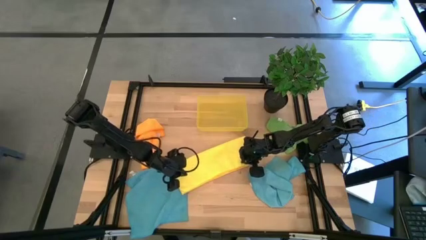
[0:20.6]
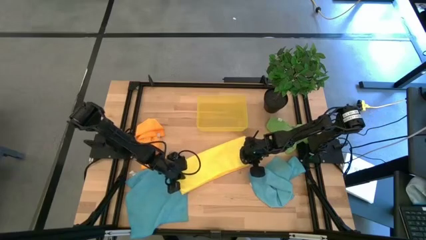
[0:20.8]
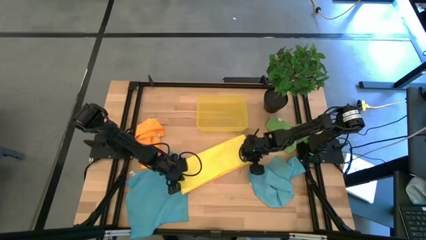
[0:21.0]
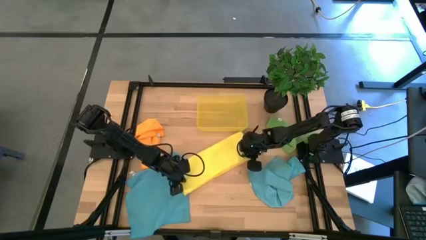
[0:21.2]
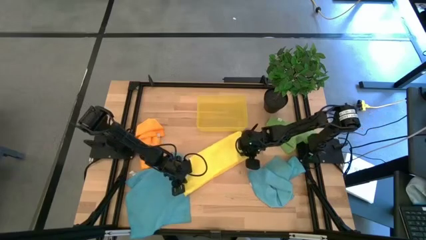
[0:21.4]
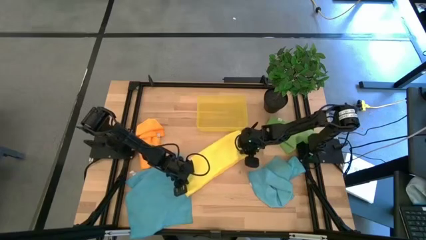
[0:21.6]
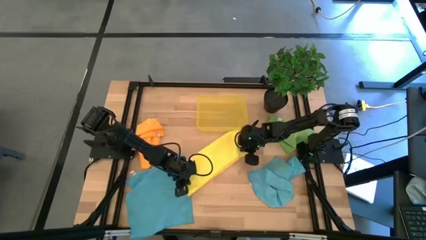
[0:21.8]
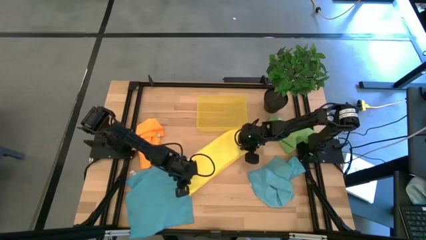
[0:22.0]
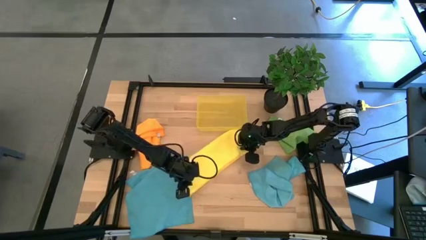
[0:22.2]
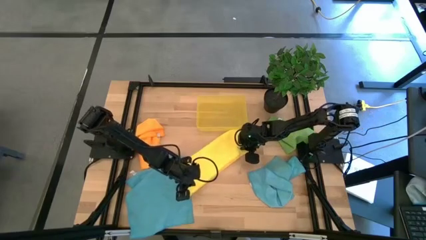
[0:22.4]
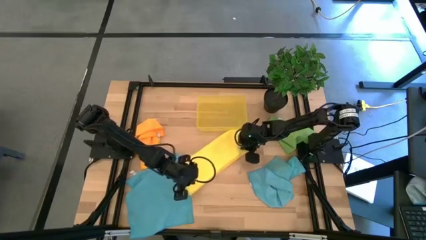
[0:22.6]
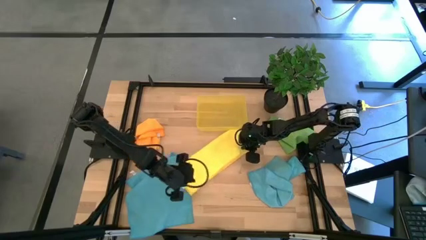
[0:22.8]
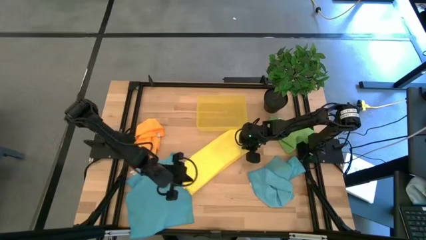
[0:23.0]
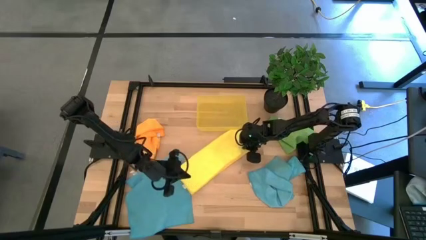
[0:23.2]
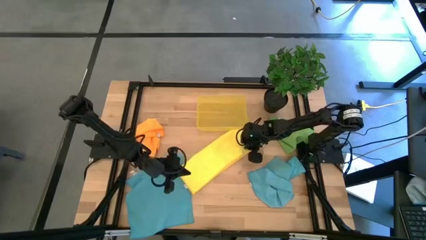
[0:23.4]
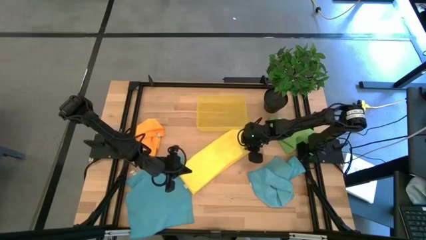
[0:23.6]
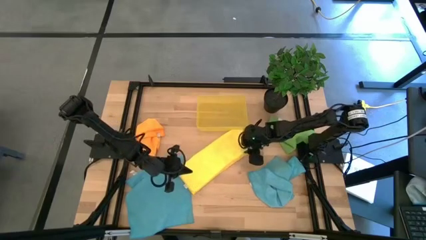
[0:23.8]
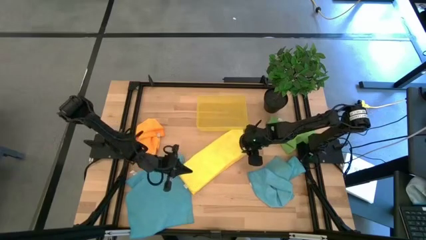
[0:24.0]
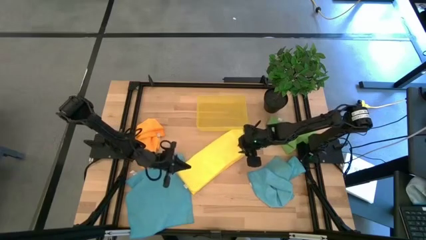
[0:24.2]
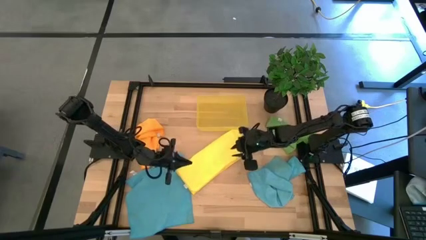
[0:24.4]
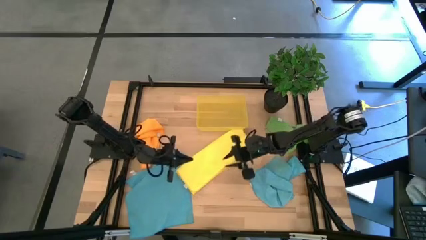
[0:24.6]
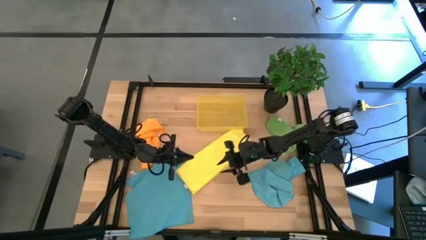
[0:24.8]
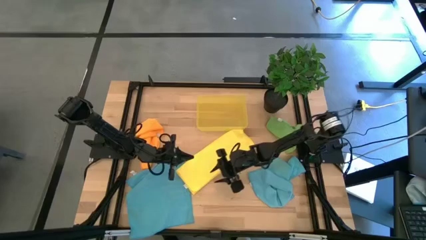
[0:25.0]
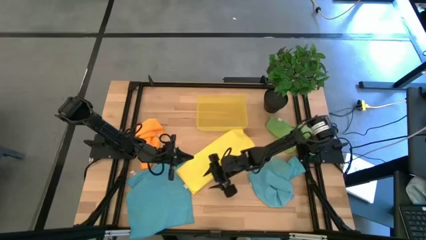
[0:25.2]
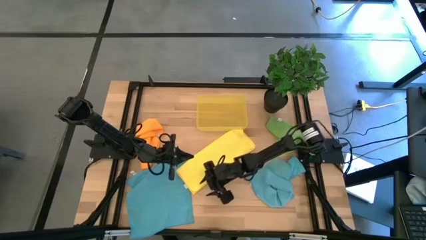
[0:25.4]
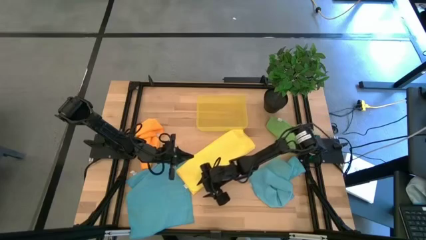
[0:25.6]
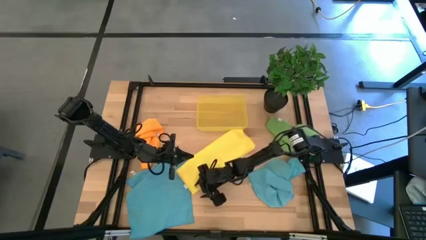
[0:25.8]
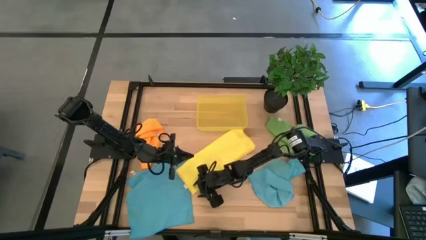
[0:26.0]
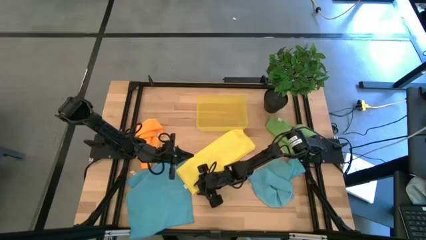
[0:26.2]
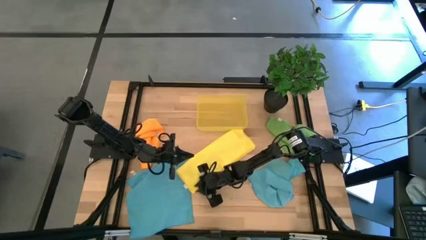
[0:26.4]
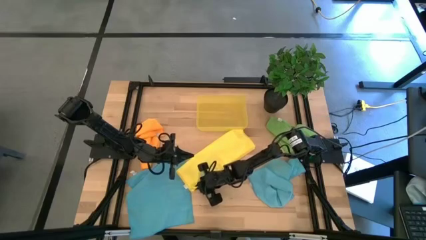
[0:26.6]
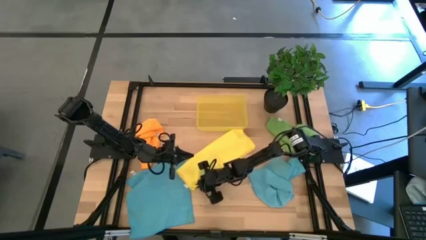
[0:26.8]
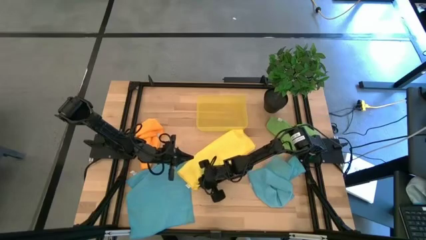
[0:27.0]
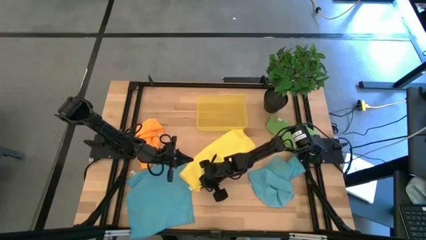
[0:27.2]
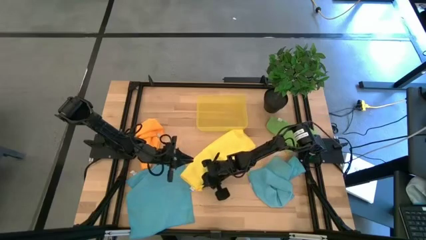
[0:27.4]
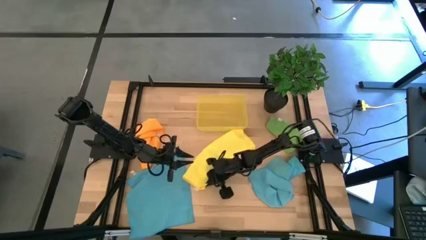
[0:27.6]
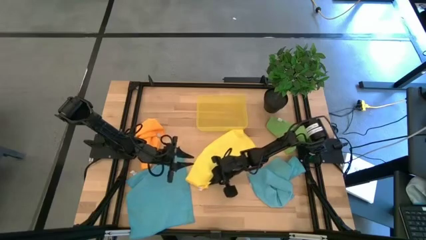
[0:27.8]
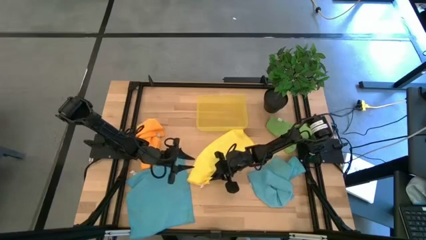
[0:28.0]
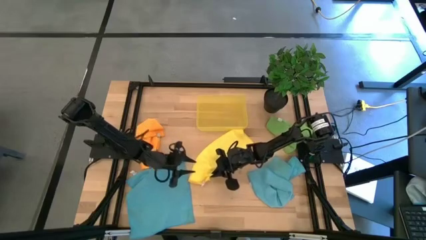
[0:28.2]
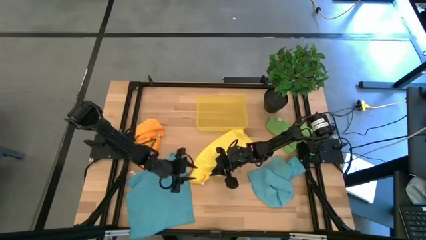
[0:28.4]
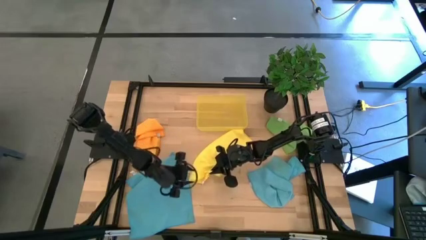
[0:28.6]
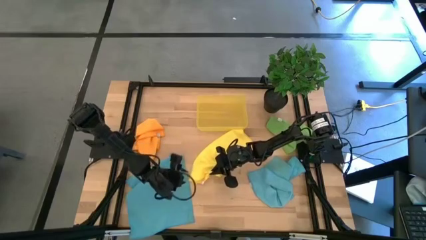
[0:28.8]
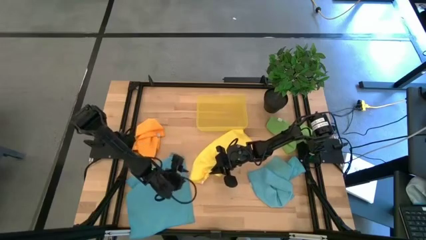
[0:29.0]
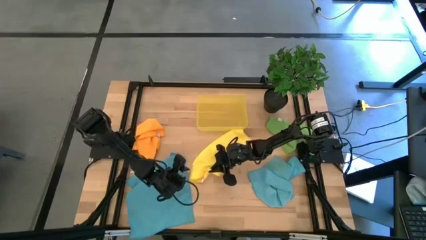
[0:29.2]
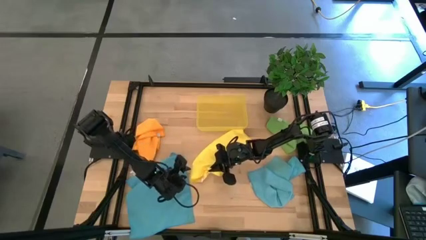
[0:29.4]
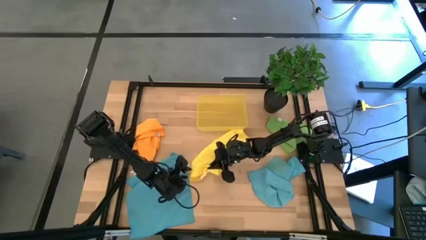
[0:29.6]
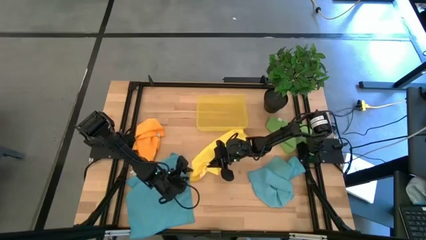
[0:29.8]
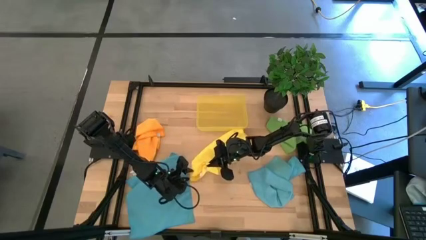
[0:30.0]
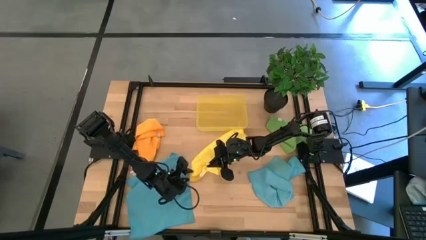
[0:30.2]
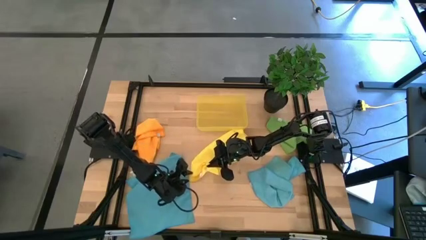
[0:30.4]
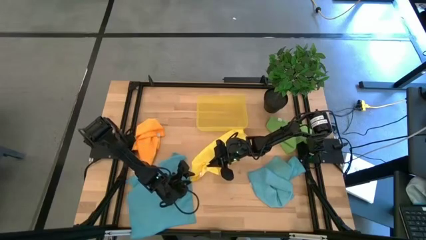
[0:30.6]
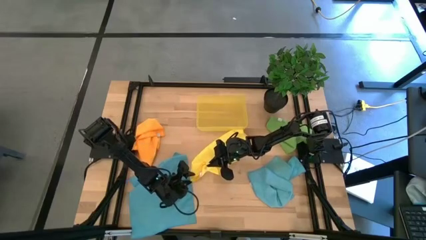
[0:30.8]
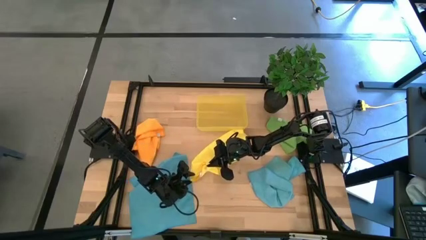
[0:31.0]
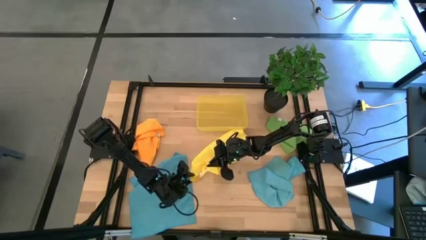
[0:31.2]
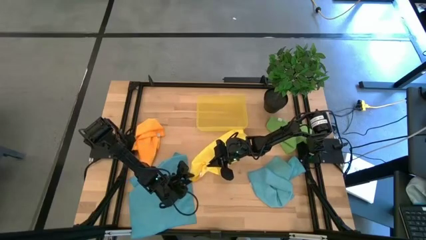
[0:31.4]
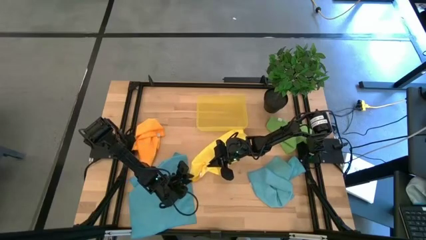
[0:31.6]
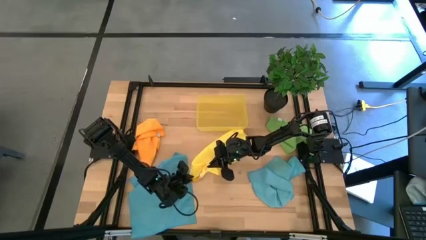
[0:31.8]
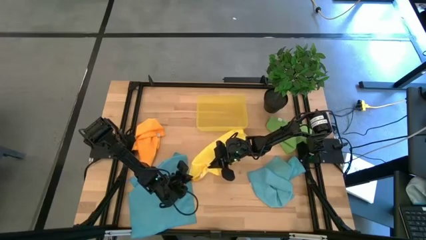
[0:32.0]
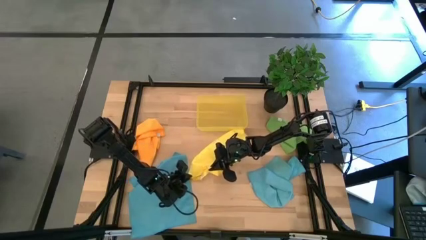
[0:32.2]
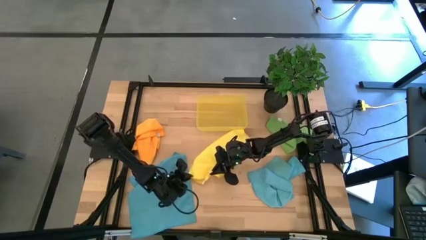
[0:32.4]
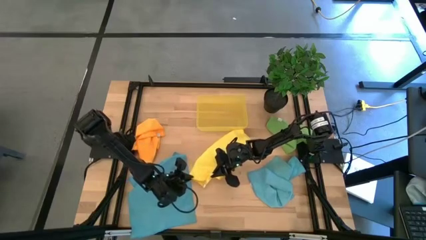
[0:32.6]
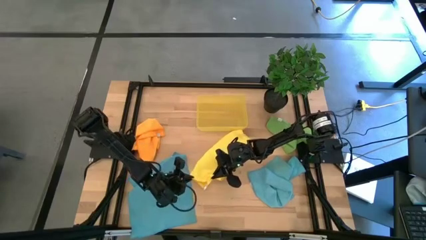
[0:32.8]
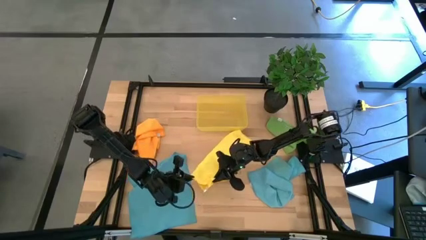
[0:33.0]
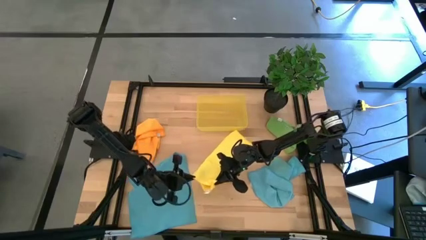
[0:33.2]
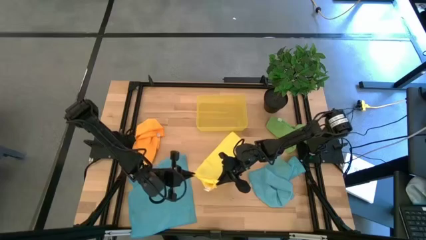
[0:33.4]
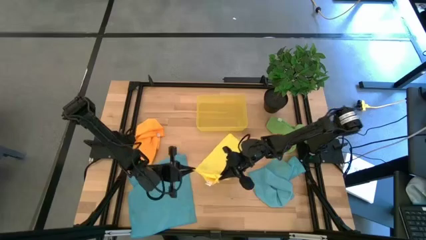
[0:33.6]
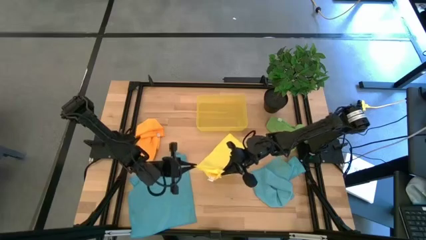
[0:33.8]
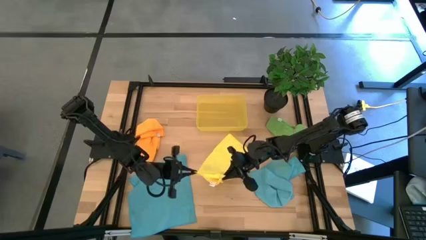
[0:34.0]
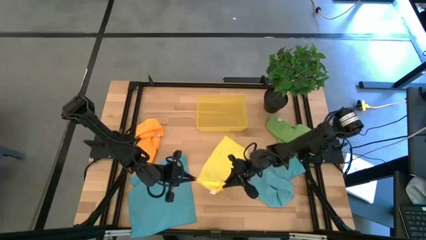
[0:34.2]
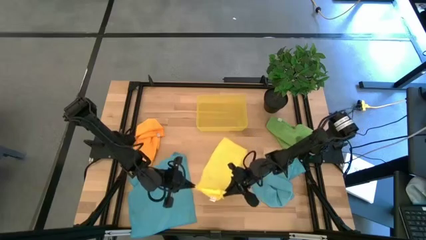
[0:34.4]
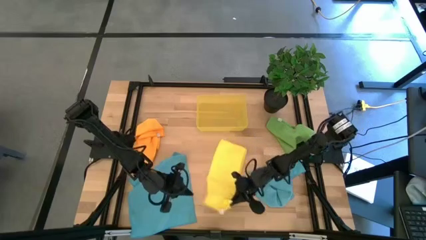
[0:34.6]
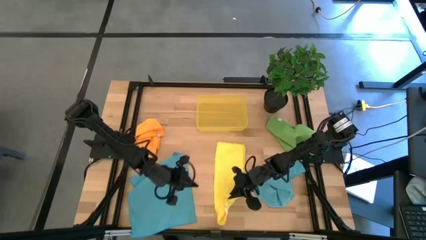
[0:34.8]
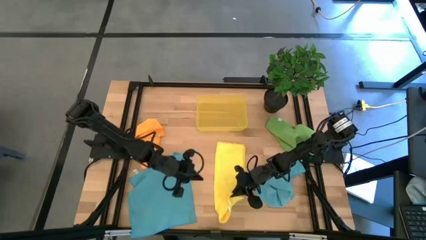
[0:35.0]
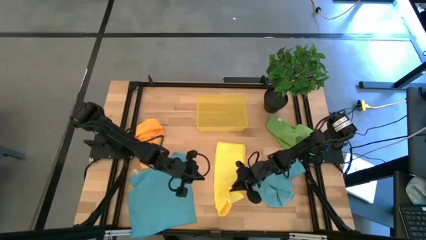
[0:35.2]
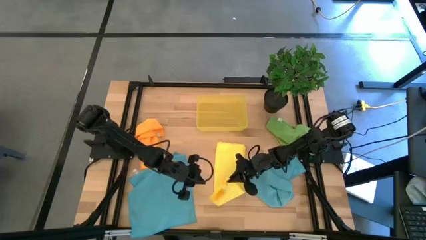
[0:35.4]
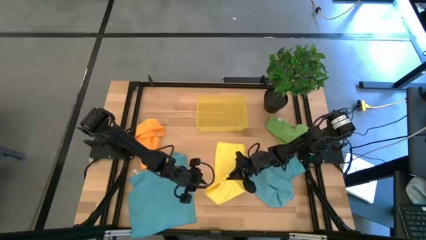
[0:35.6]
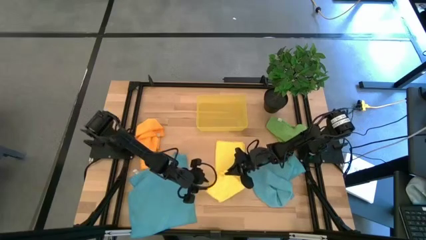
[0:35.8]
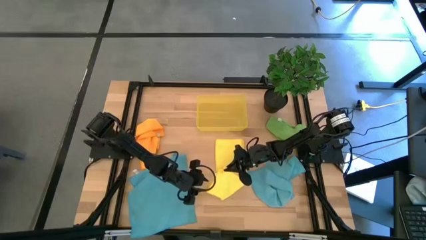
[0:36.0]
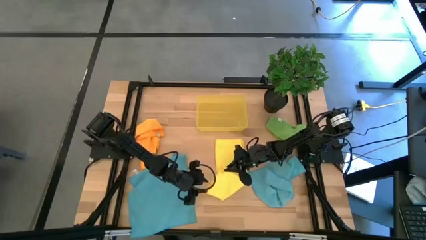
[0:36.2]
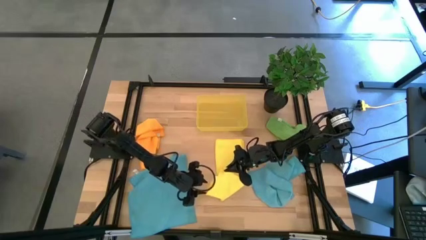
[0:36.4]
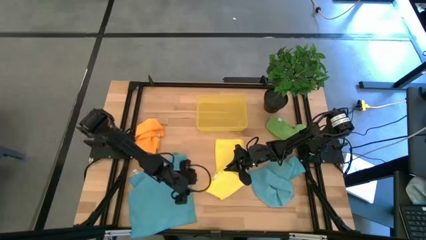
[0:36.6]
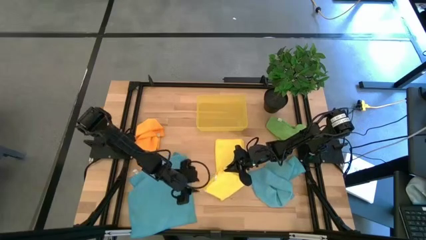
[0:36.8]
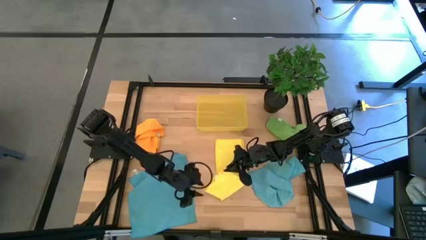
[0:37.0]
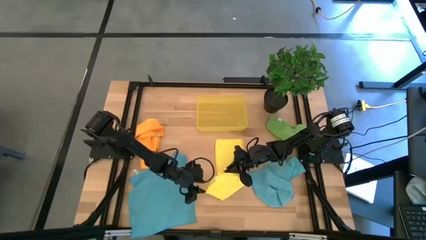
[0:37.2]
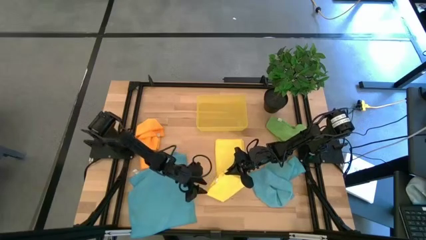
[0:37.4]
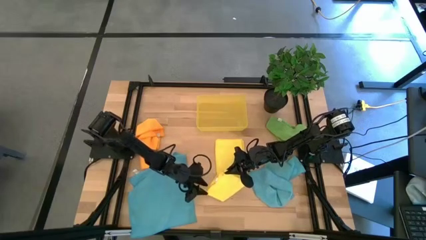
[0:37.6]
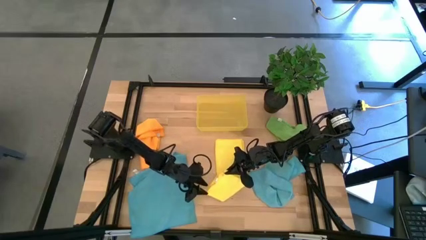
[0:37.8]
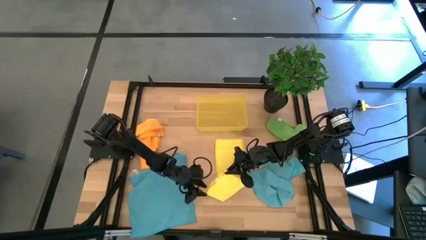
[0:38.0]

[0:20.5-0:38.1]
Task: Fold microfiber towels
Fold the yellow microfiber towel
